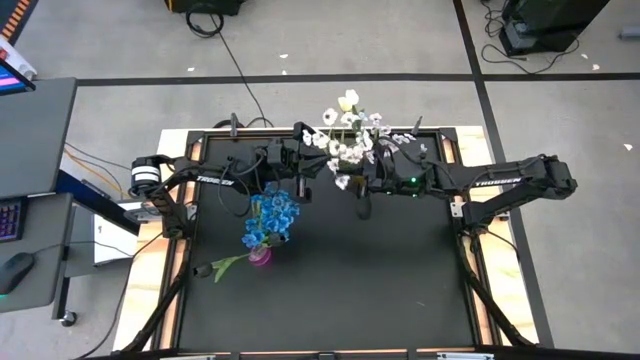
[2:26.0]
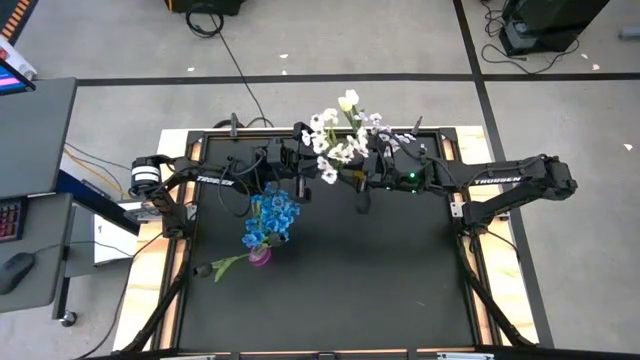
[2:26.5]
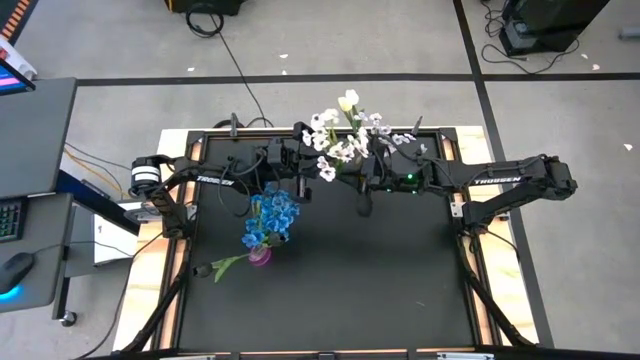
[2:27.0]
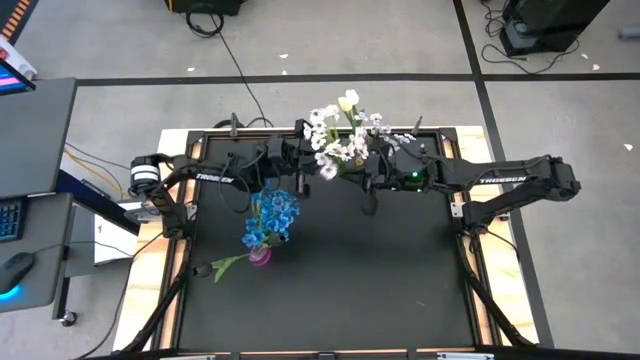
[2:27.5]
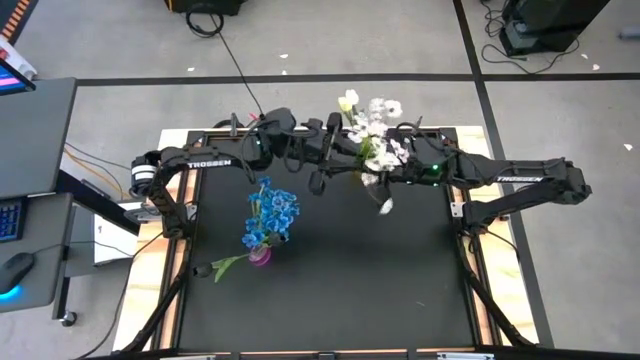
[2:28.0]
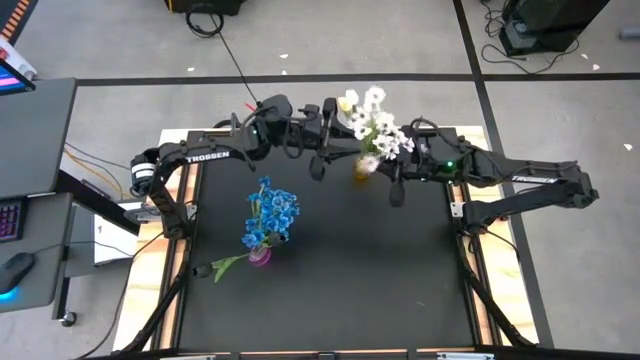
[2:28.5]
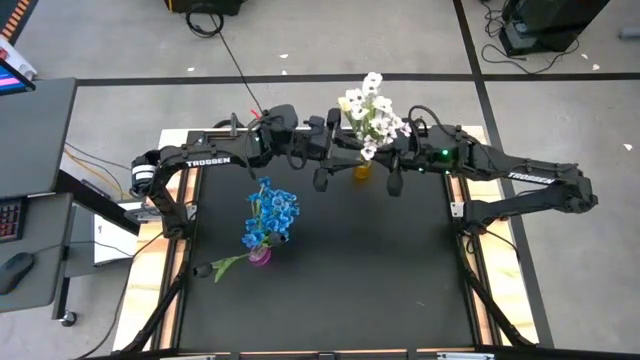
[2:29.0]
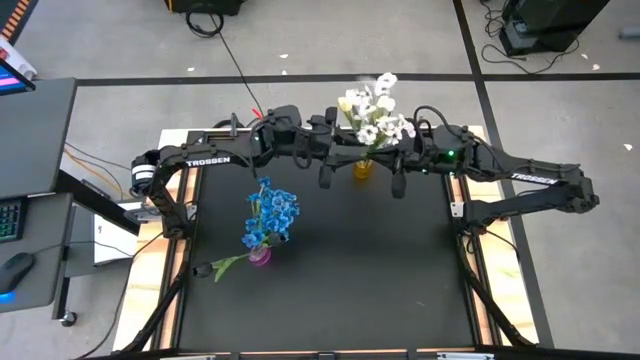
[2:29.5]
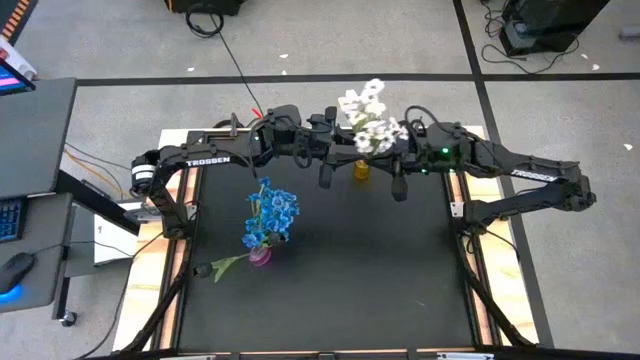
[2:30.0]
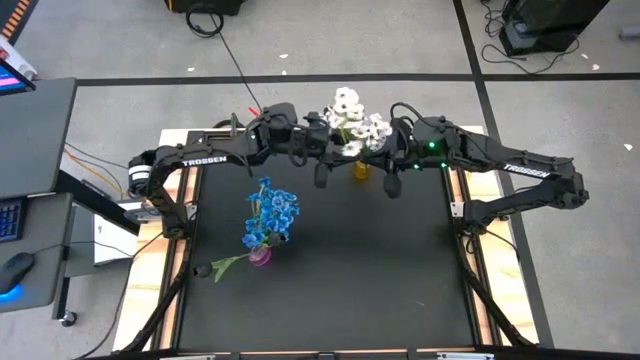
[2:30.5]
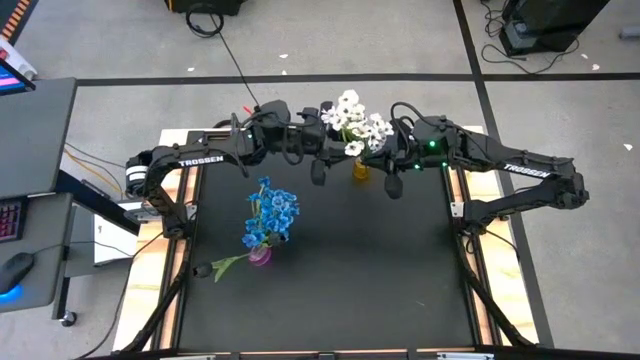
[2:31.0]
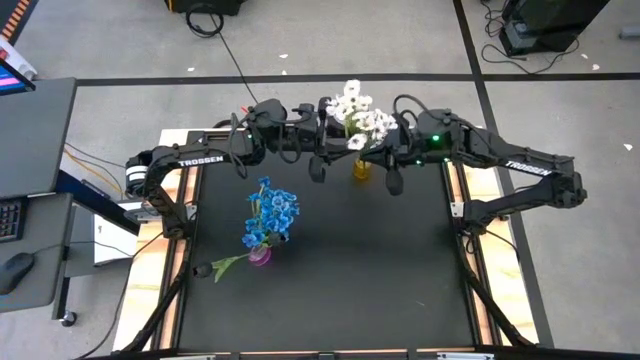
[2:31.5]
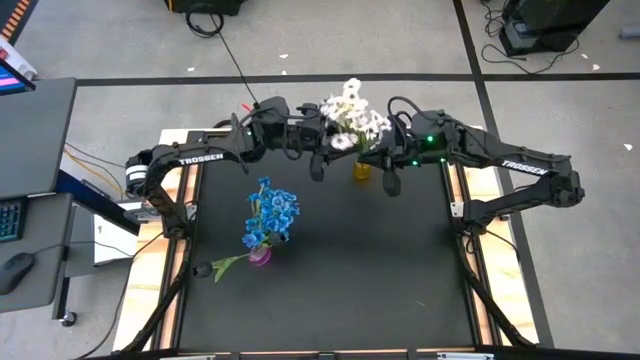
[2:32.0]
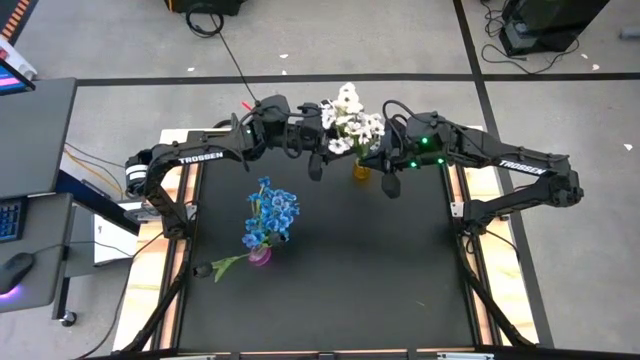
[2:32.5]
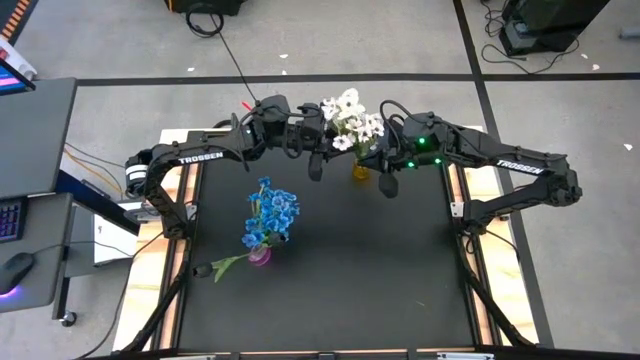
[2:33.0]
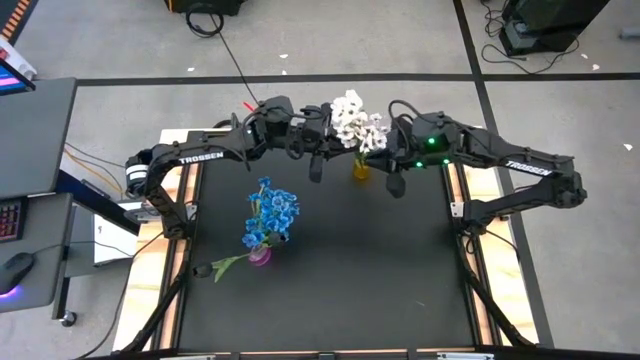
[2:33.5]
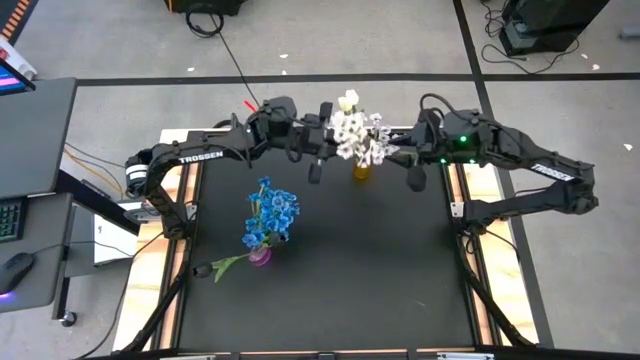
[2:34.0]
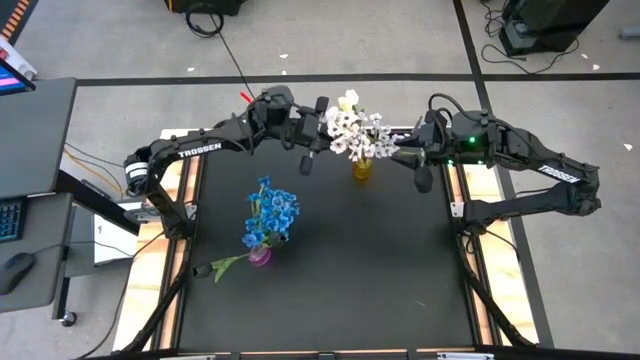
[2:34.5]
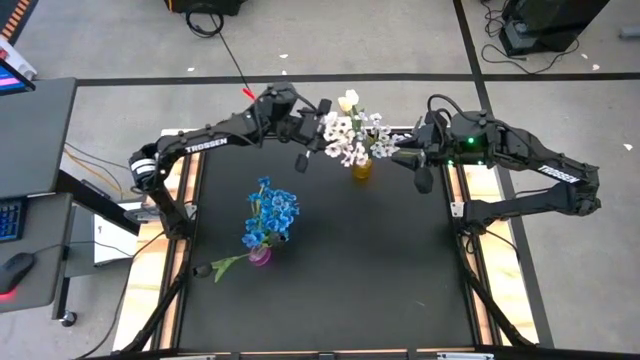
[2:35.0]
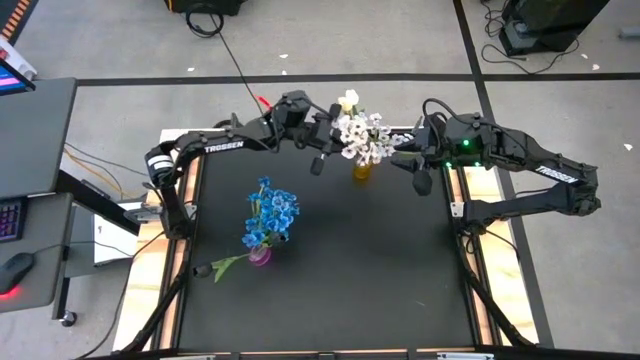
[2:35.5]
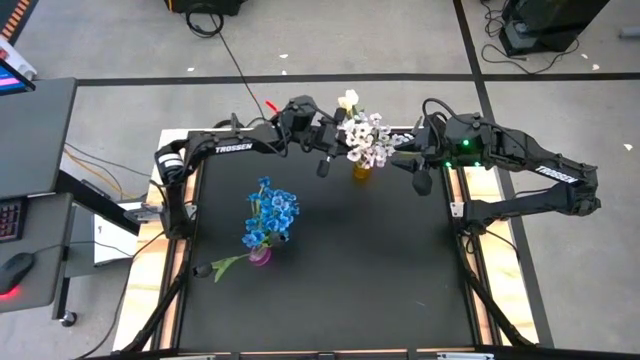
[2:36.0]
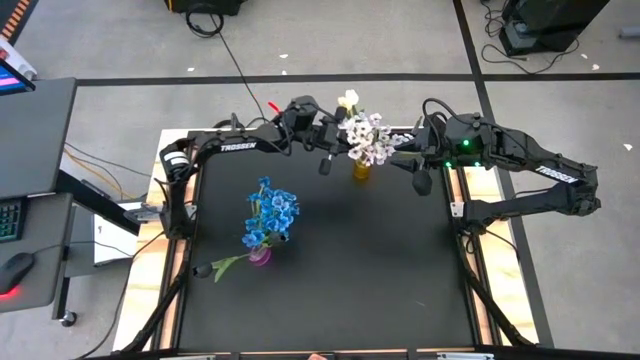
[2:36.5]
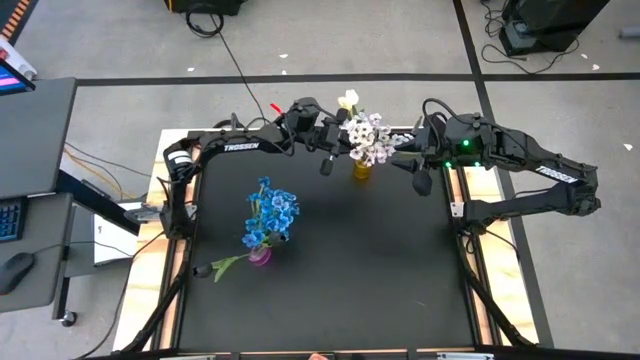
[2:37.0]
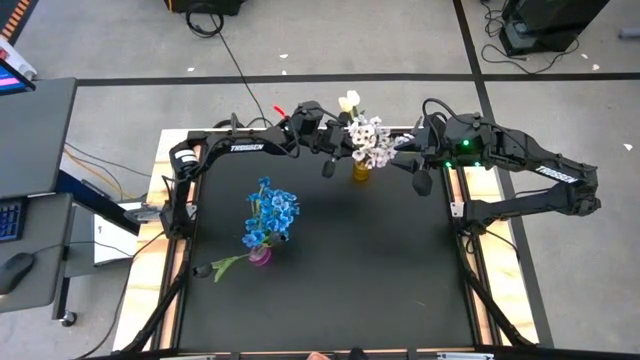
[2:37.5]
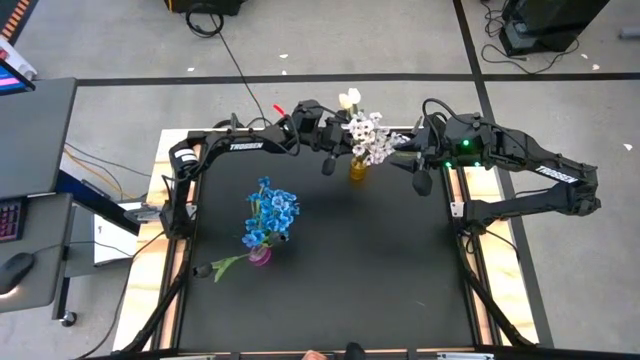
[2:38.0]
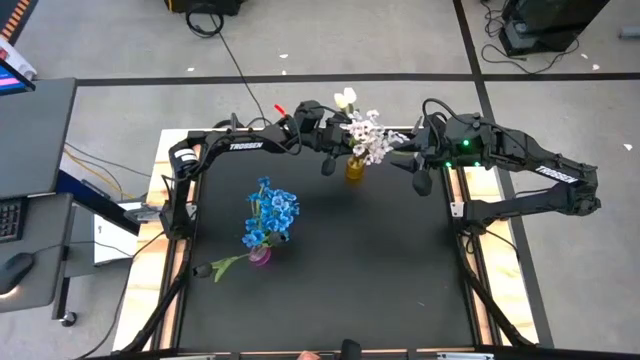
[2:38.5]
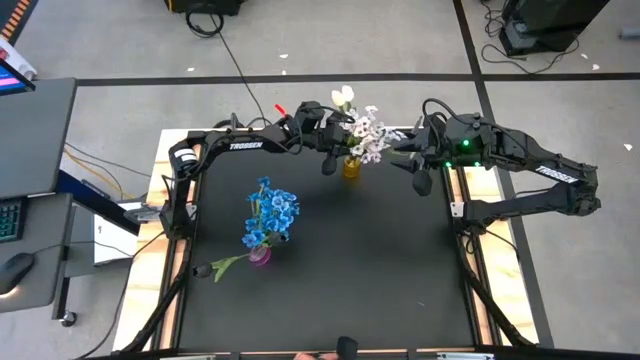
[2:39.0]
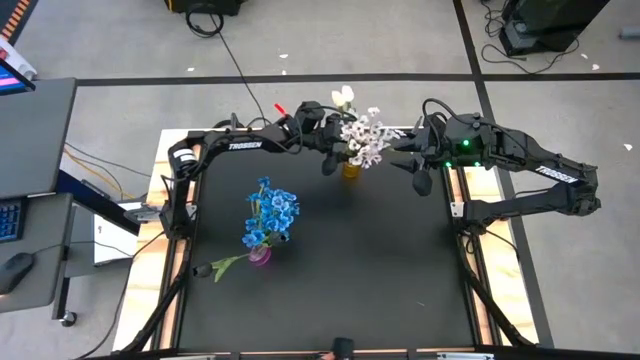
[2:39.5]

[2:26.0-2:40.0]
Task: Sort flowers into vase by color
Put the white flowers into the yellow vase

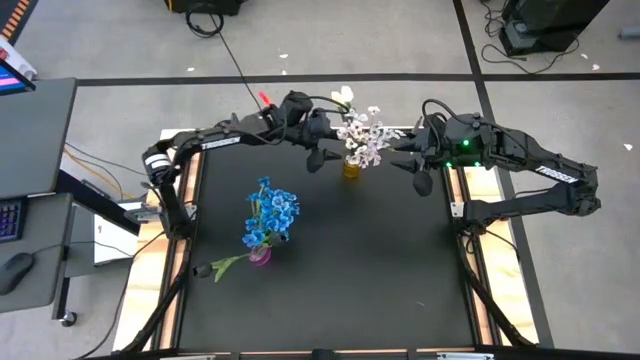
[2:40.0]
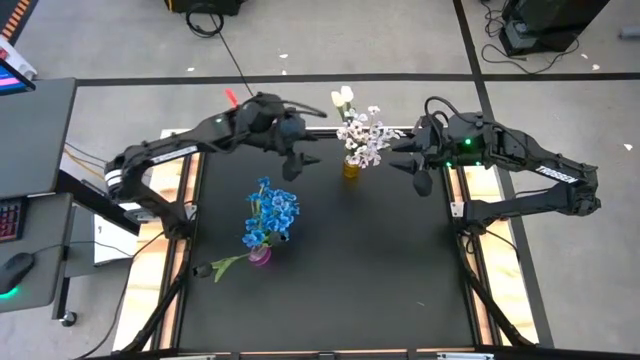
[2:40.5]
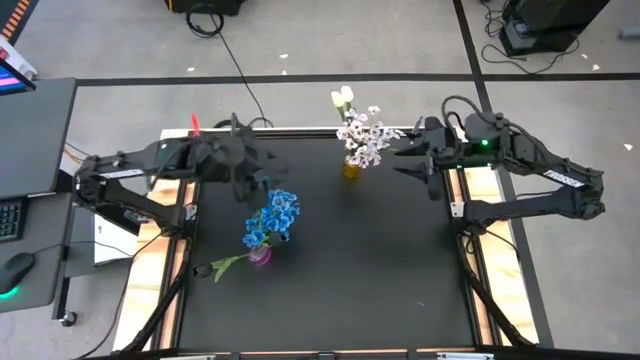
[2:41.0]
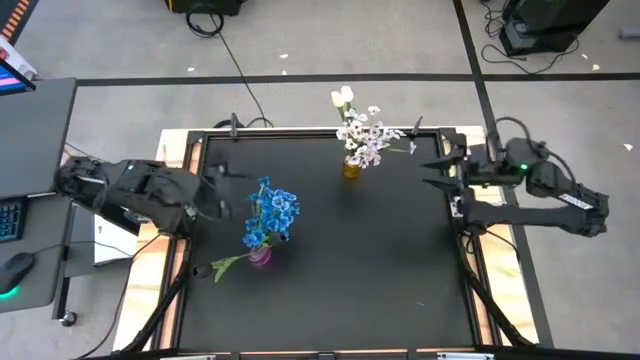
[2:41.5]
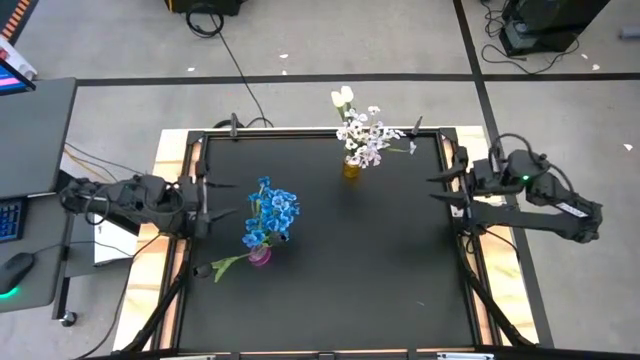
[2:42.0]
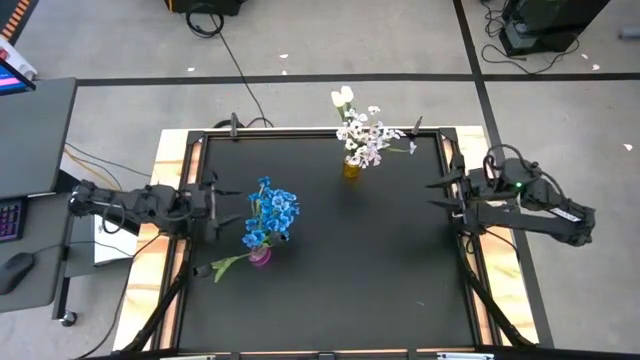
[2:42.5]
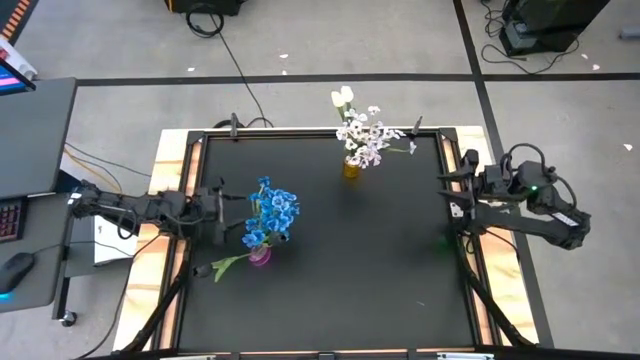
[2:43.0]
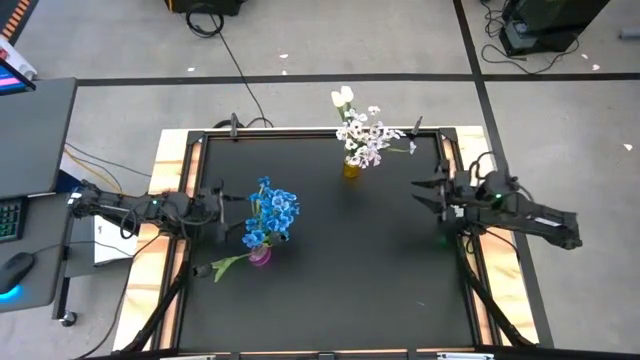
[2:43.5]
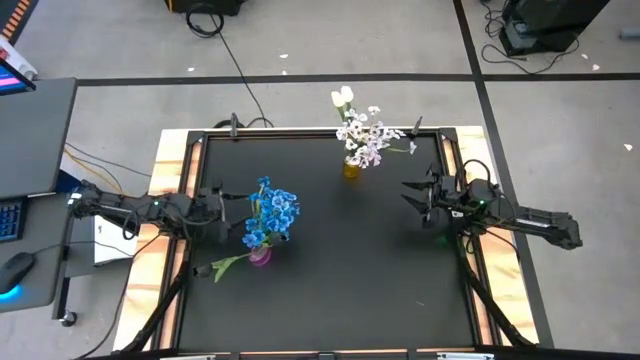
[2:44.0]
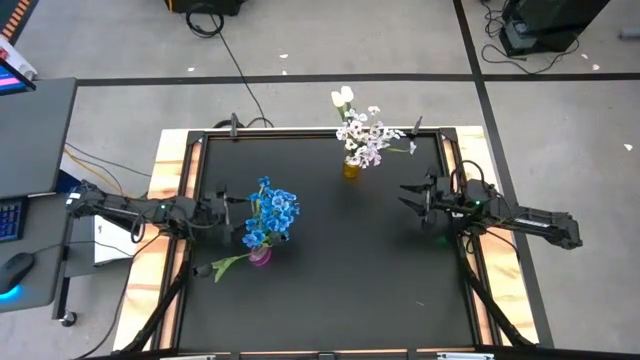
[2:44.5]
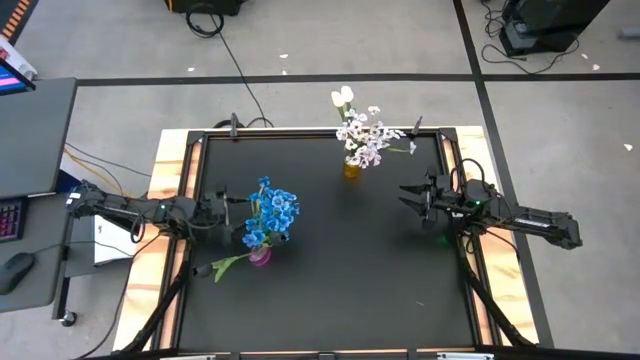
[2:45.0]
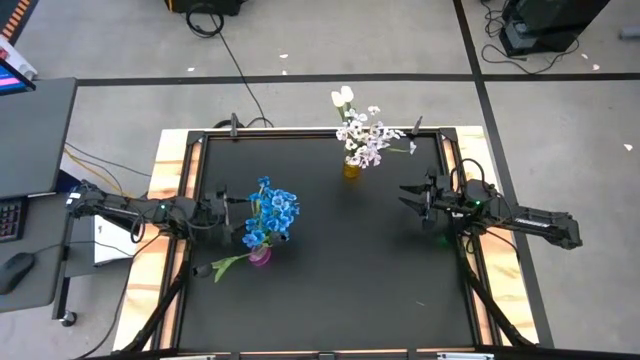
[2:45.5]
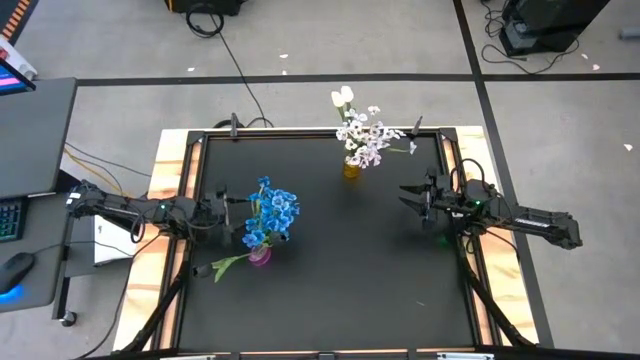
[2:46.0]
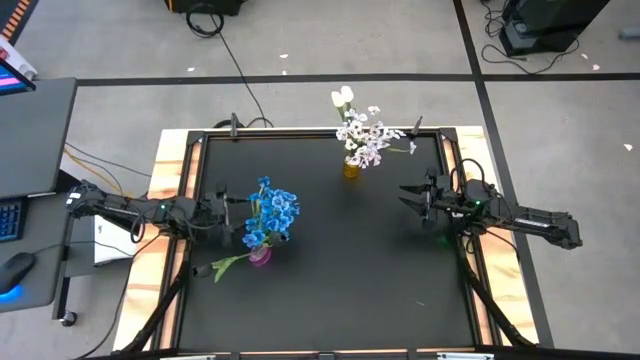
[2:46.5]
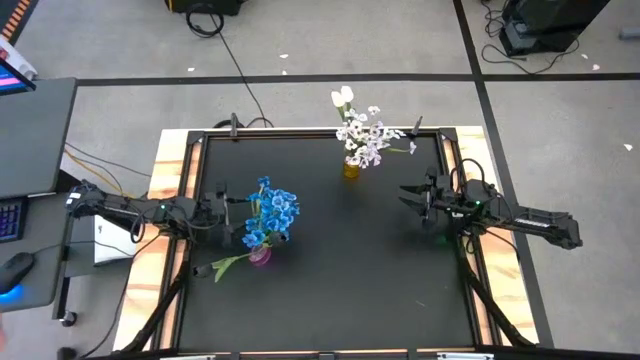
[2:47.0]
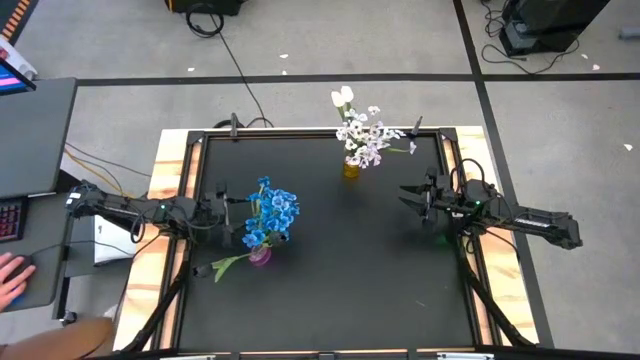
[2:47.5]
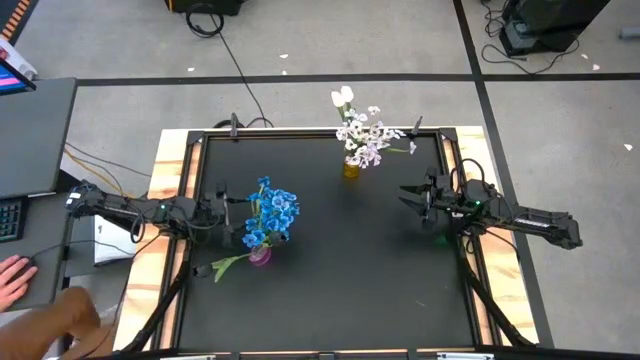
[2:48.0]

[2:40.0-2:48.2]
Return to Home Position
